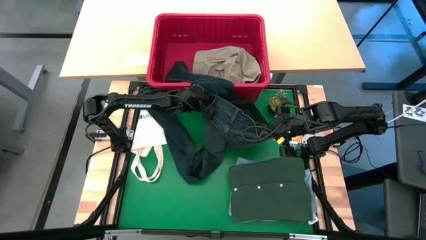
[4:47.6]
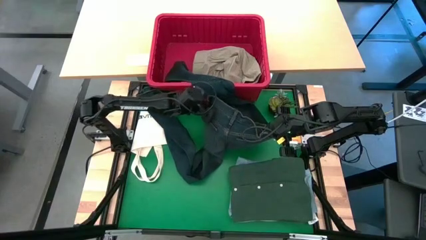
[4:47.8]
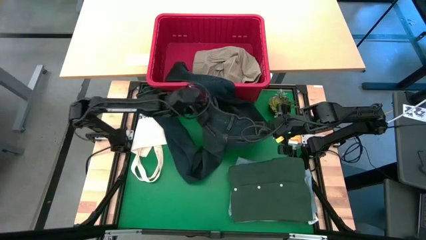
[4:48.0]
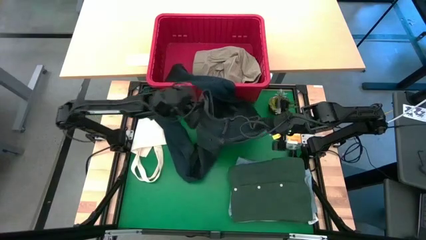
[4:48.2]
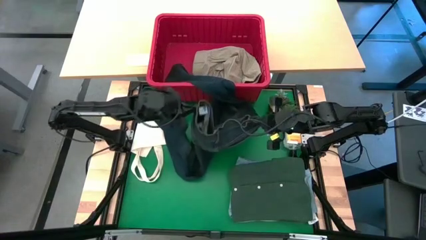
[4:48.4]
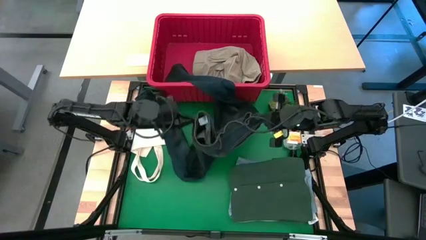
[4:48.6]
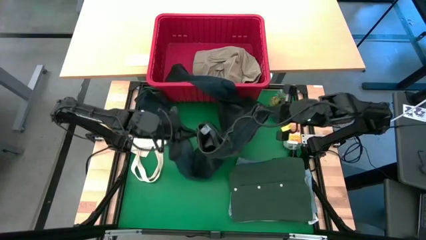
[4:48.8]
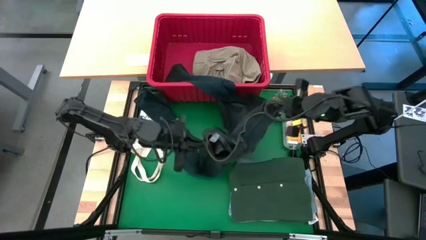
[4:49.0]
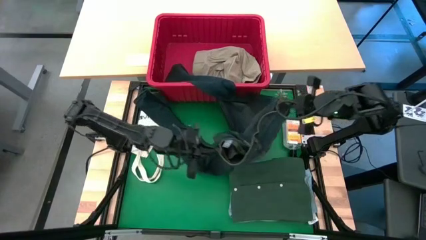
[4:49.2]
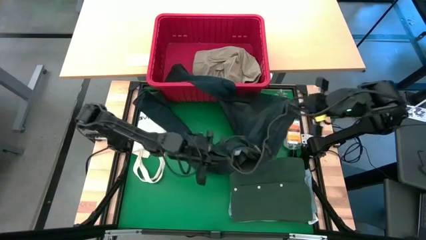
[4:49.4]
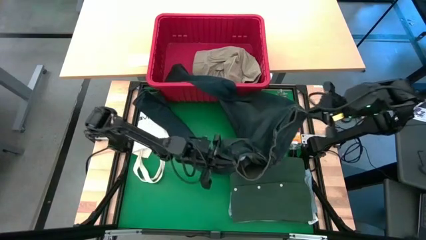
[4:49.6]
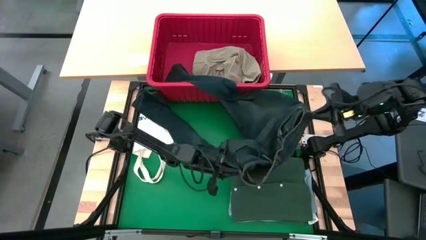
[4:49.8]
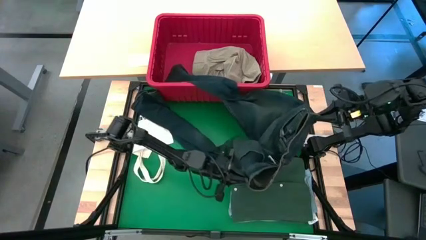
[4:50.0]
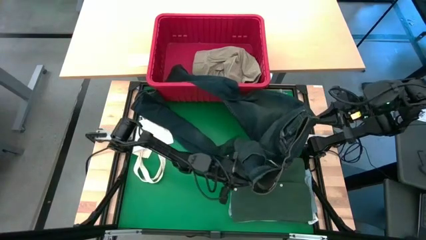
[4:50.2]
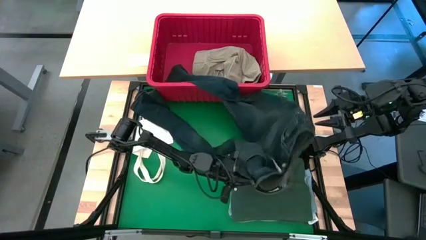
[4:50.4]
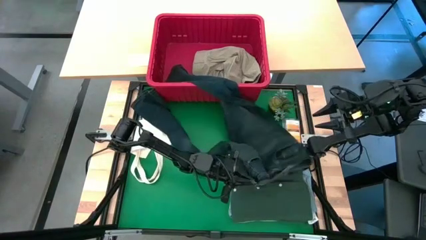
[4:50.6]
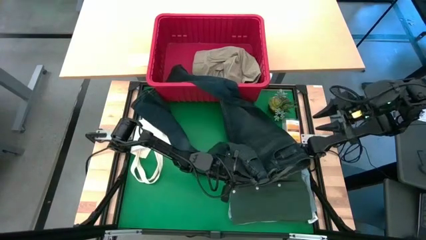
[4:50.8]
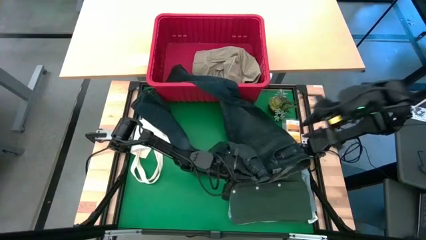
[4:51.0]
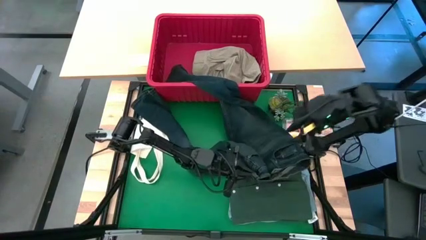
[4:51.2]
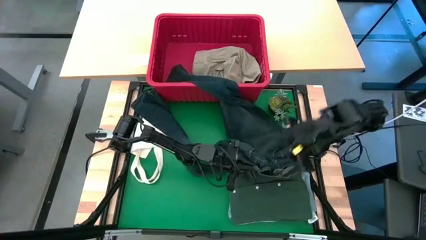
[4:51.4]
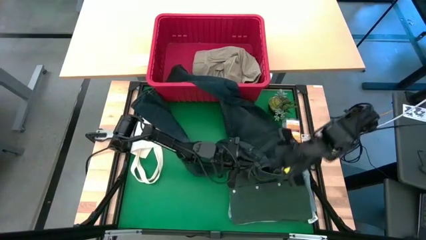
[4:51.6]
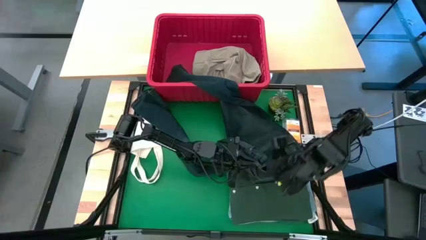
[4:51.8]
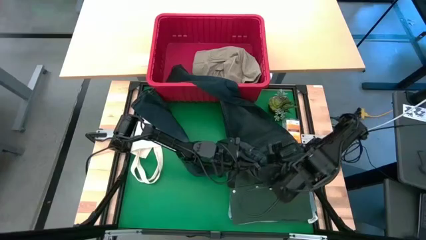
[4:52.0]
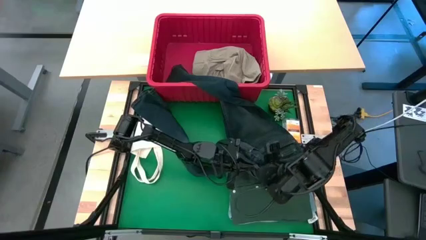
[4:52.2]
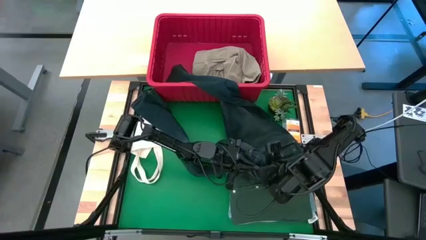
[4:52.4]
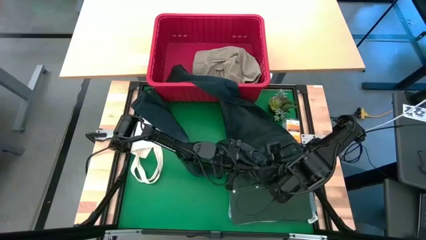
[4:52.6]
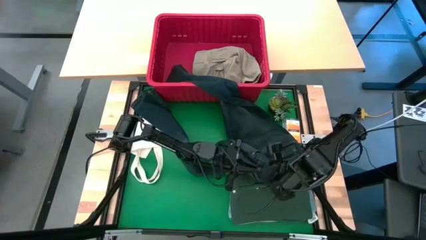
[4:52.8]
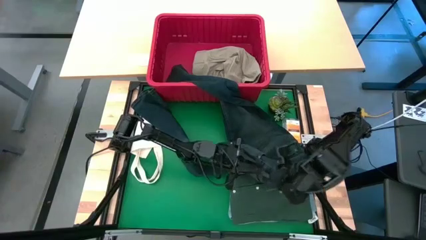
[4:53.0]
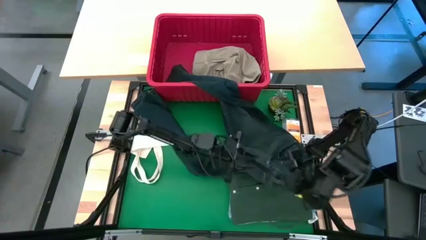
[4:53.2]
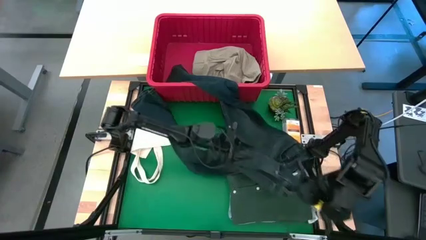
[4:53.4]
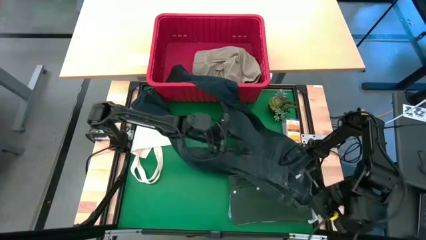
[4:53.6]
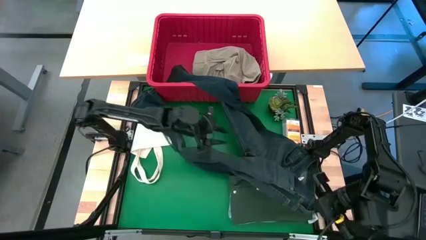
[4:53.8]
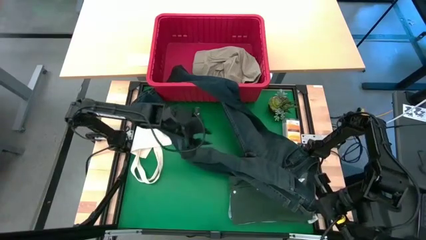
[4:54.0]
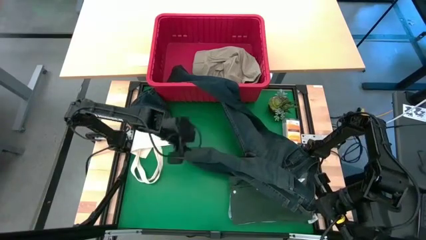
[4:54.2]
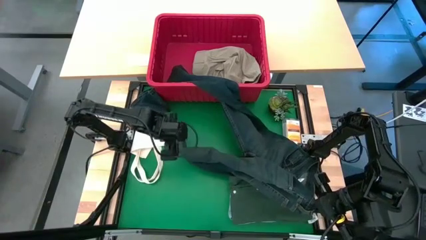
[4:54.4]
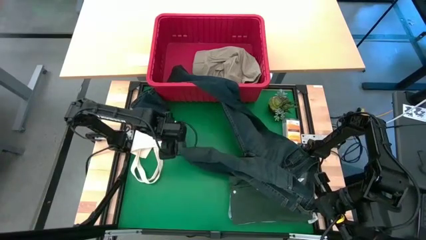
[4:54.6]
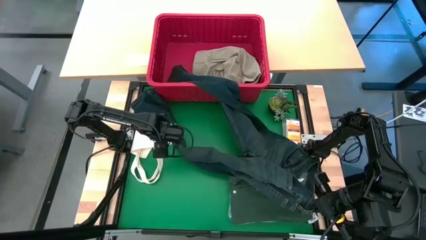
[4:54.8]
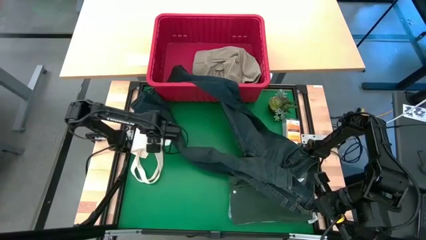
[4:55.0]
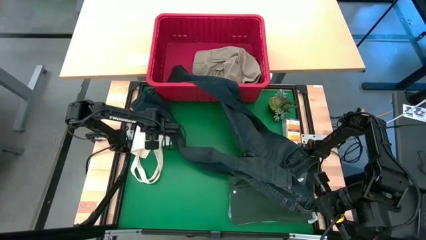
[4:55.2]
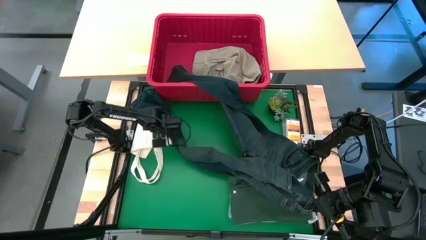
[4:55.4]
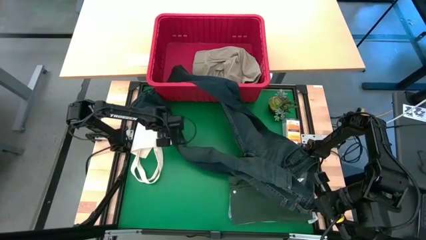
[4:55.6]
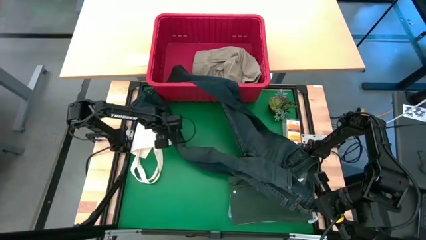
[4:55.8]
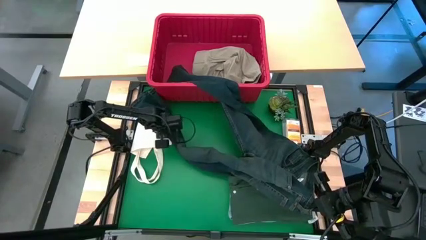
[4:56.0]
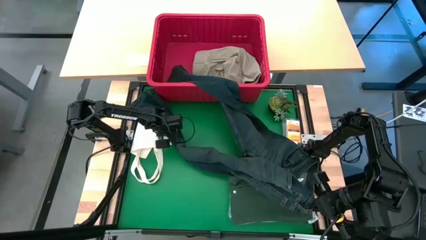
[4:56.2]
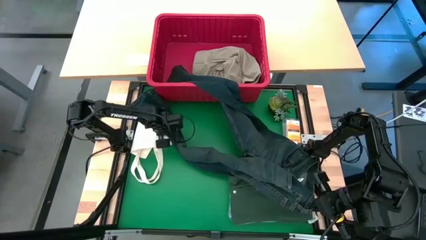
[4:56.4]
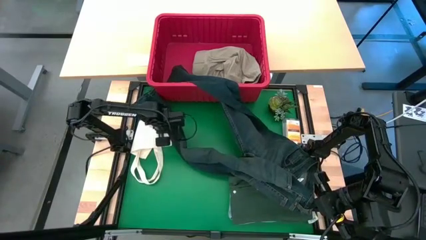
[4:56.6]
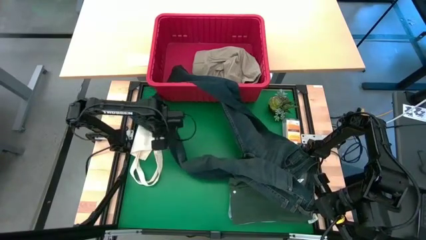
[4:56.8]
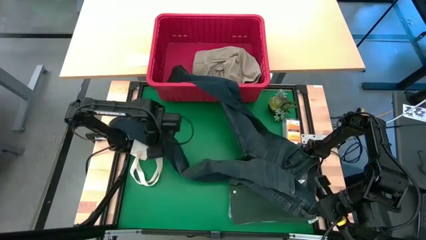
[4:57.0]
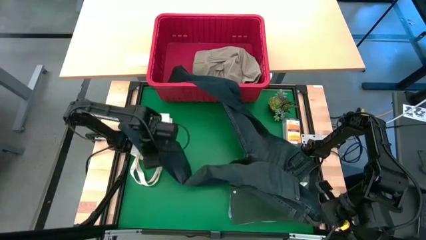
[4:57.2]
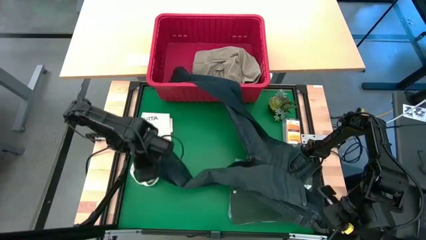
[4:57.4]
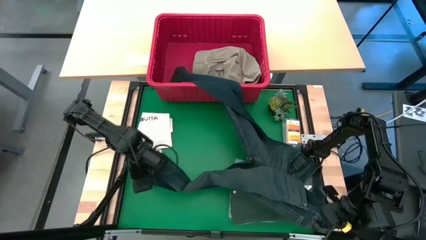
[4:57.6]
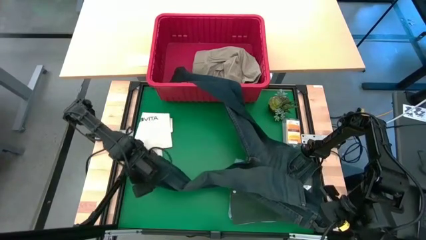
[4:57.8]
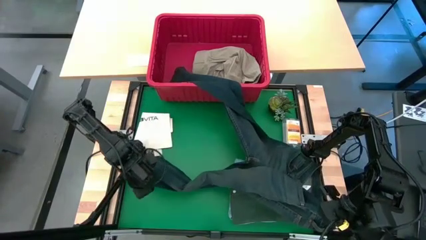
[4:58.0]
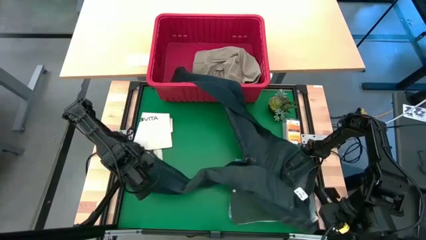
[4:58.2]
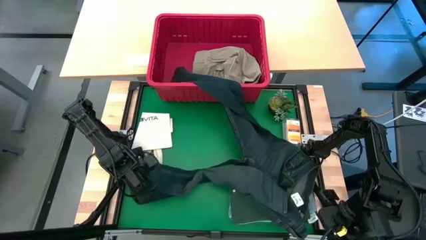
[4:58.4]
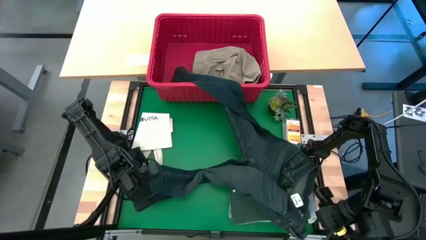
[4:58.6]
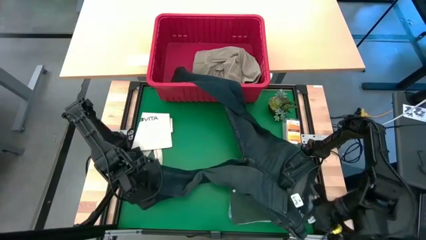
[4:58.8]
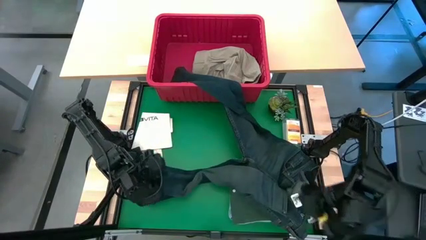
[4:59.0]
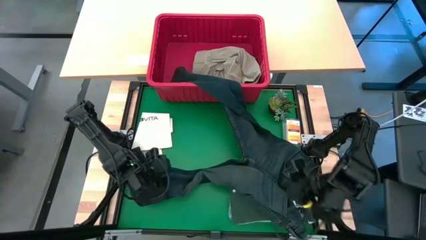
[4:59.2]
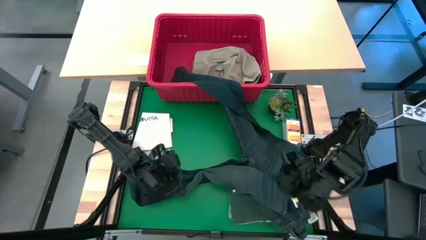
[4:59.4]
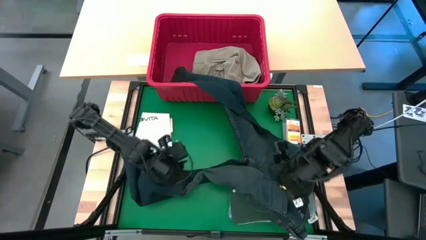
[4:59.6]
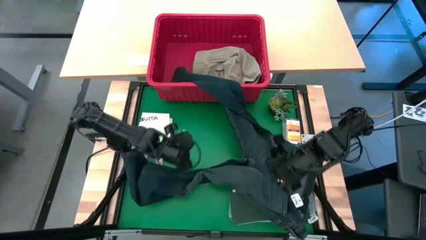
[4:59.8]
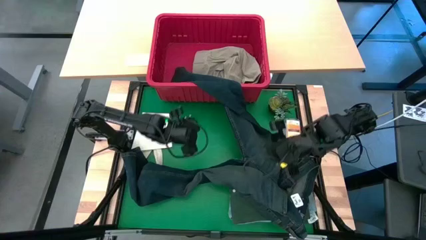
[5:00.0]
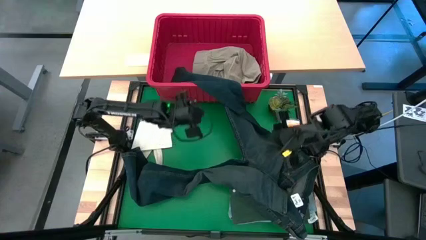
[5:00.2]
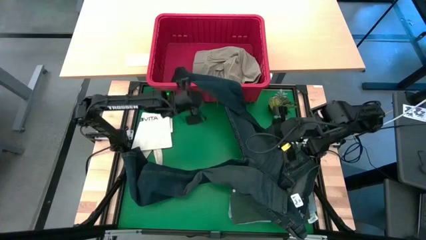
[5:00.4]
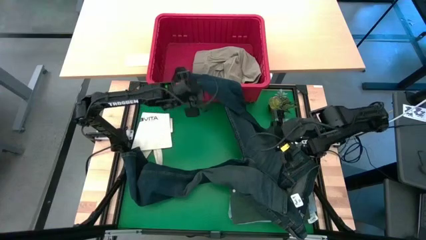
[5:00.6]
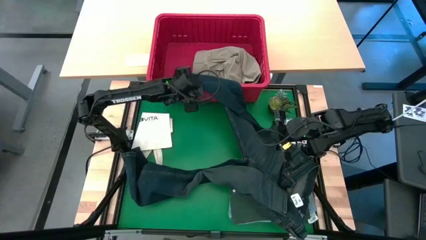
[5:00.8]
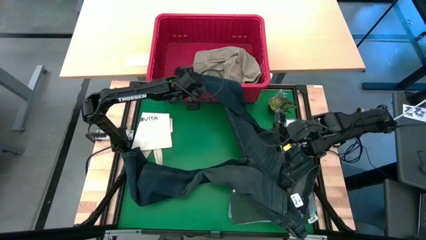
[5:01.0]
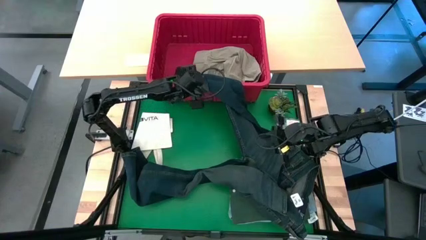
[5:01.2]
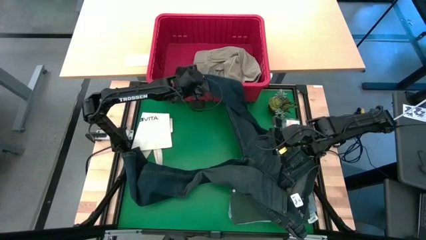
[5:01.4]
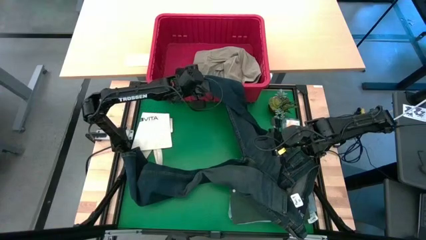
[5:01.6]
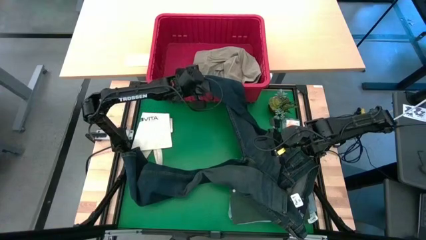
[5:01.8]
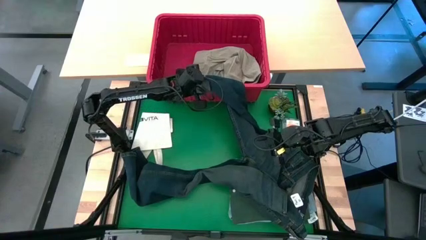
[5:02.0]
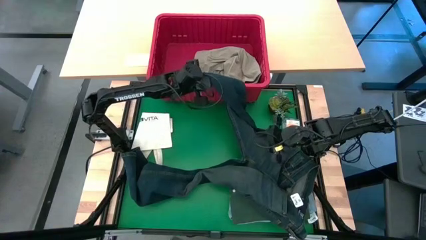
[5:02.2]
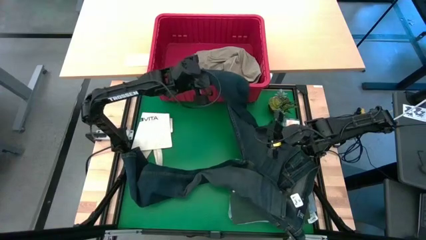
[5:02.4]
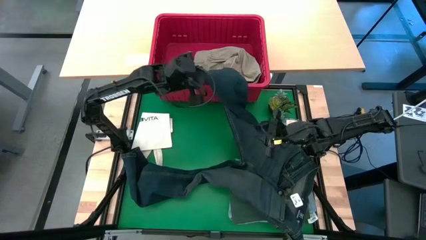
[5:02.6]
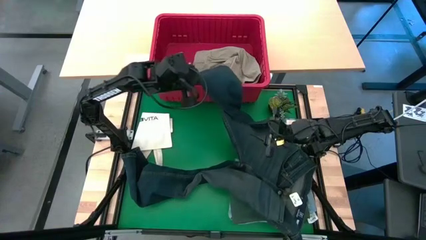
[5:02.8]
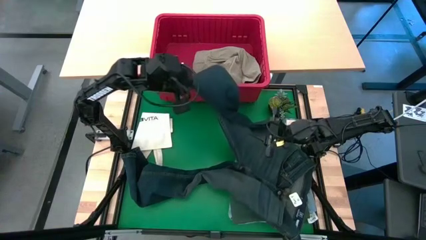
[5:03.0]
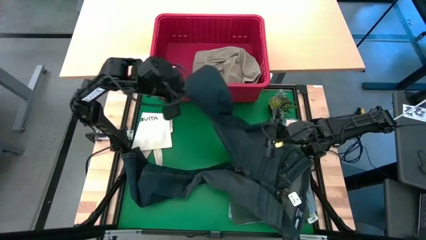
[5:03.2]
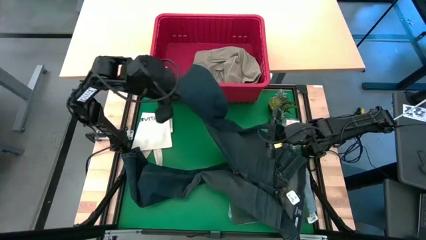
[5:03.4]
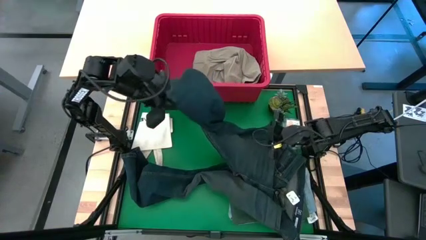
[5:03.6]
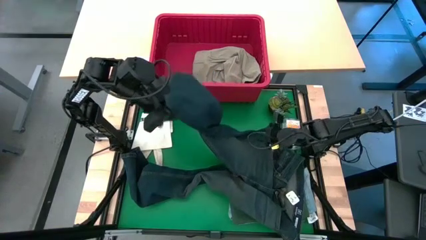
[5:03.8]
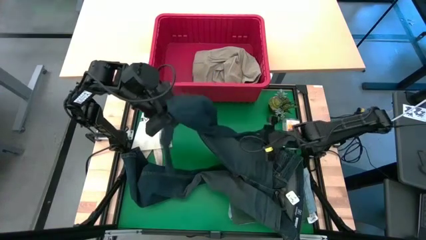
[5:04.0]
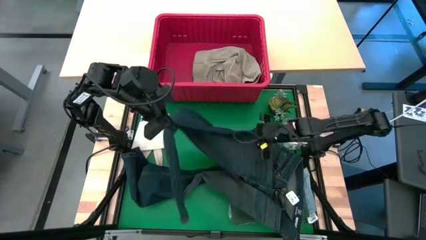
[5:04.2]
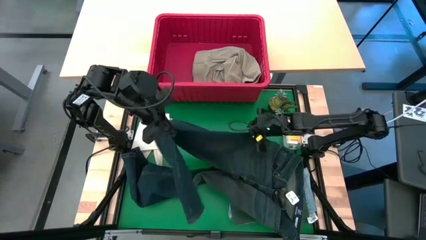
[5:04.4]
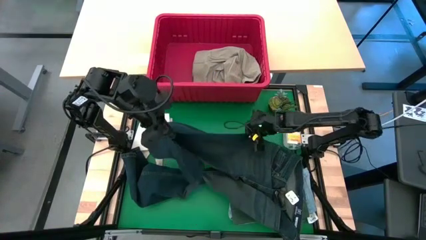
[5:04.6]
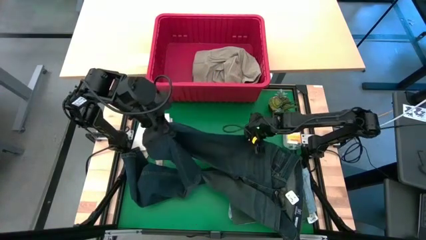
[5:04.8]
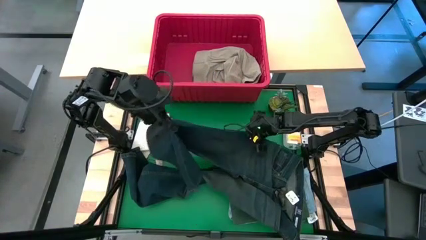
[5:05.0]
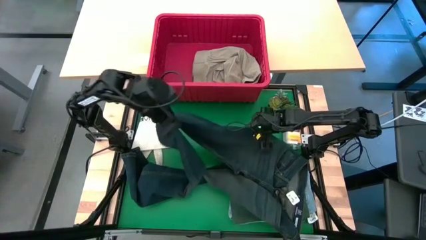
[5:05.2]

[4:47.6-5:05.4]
Task: Fold Laundry from Bin
Remove the dark blue jean from the red bin
